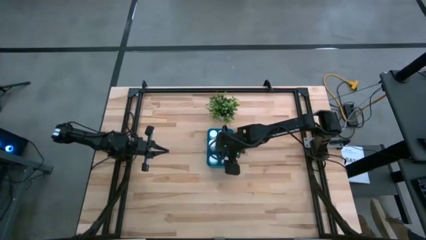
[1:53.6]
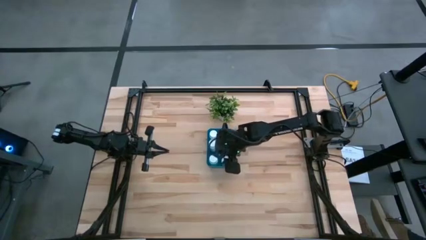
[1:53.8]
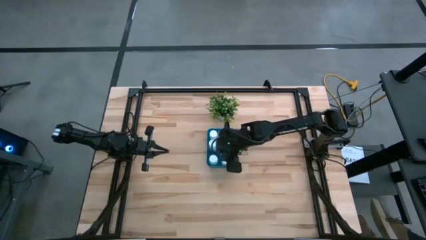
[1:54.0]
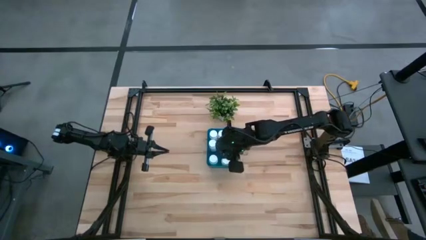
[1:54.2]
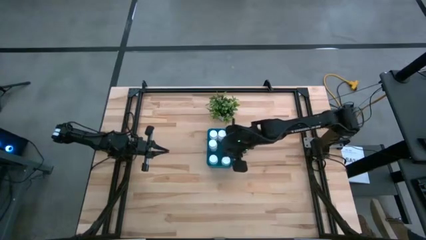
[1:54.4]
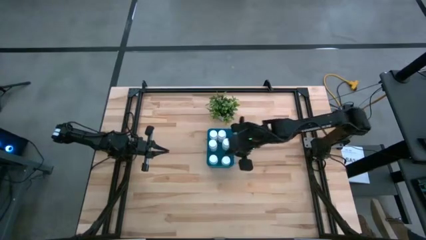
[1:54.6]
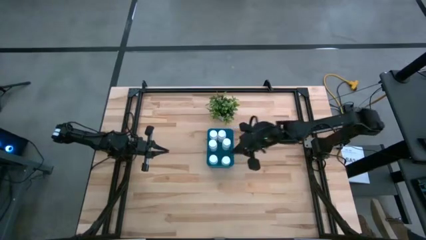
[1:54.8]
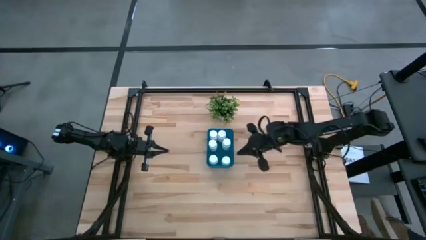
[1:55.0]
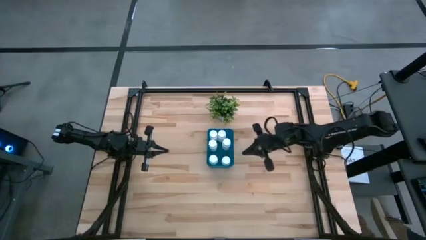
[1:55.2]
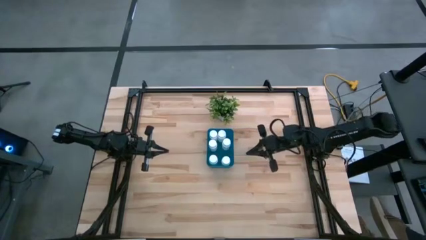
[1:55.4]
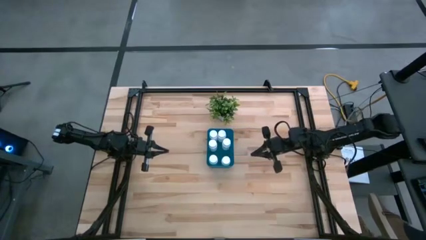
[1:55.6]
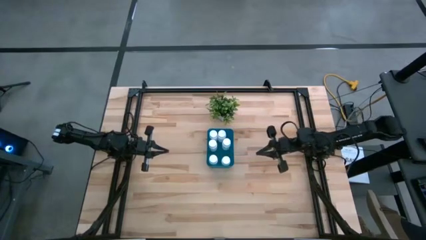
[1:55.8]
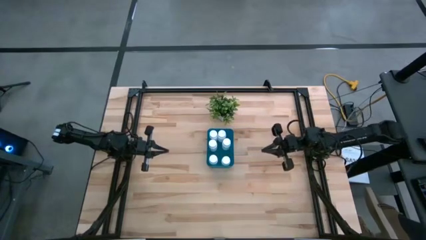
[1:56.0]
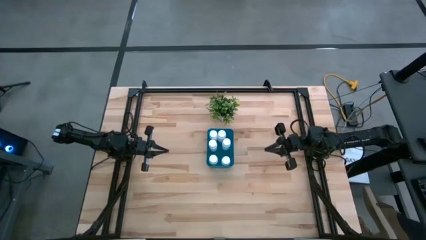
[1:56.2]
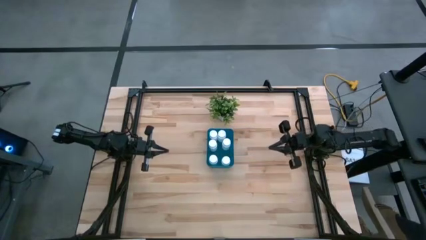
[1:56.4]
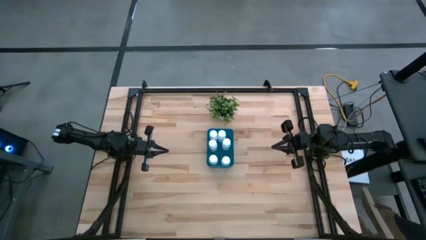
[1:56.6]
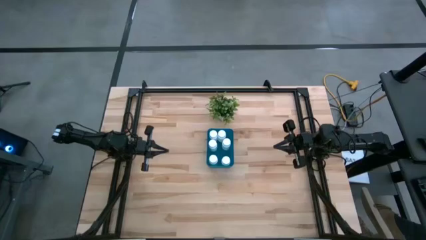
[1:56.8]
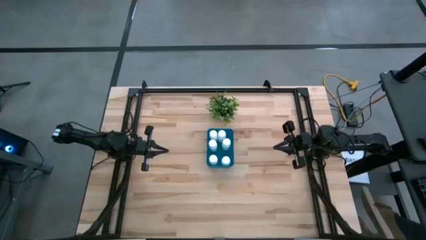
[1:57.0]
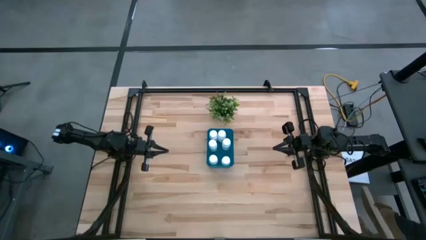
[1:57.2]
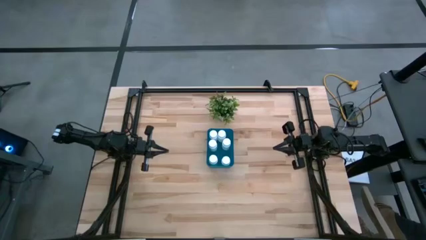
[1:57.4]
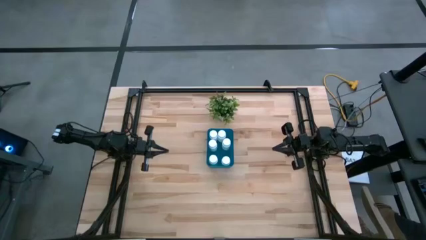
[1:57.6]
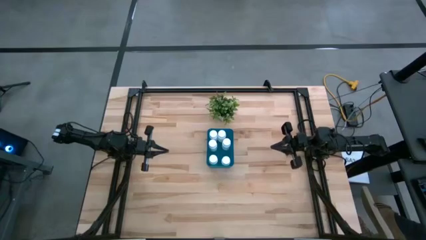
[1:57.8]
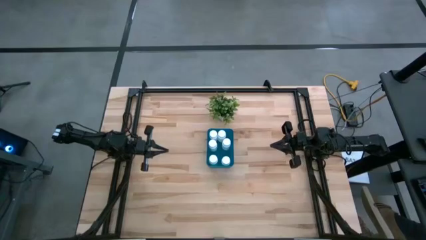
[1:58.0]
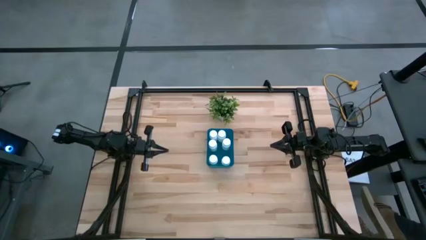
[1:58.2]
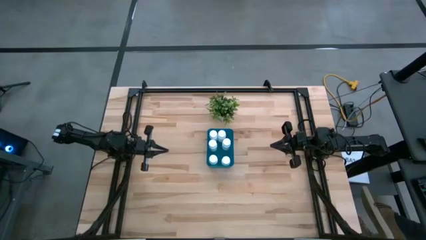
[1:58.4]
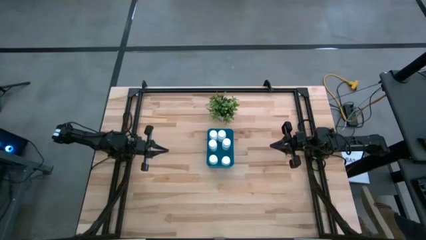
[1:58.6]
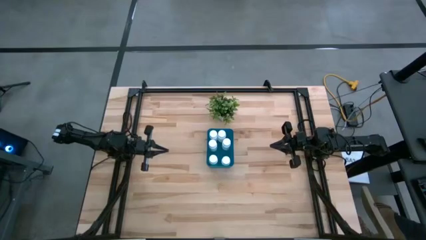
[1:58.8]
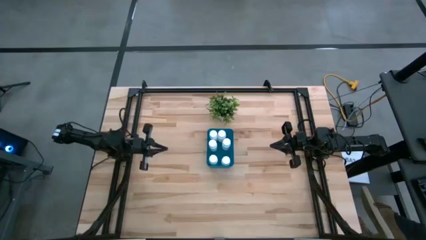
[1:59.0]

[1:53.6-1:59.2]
Task: Pick and place pill bottles into a basket
Return to Home Position

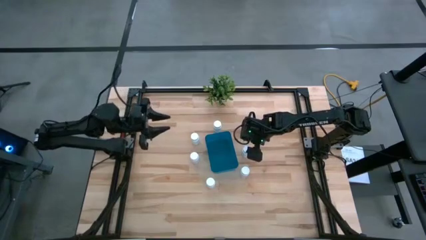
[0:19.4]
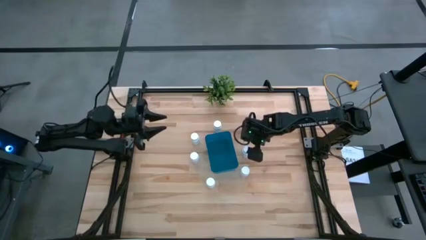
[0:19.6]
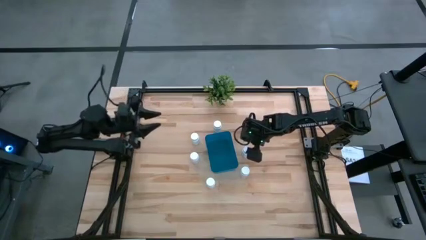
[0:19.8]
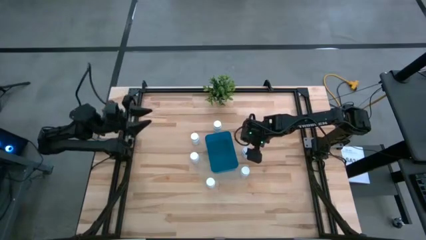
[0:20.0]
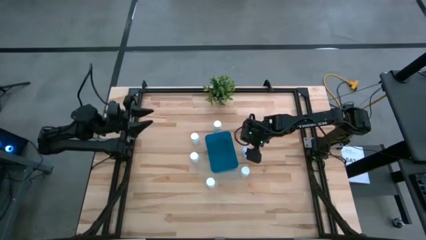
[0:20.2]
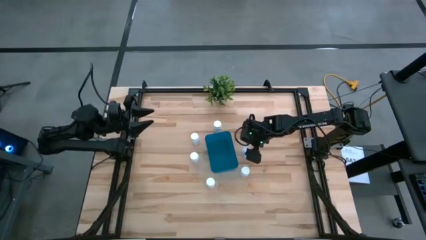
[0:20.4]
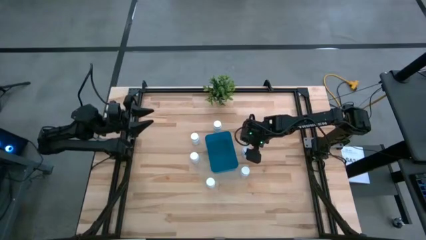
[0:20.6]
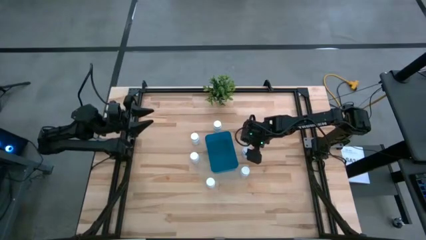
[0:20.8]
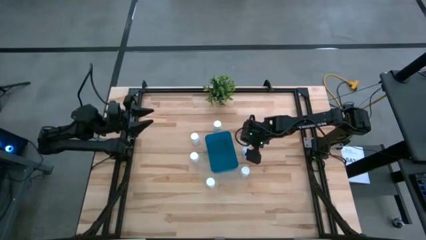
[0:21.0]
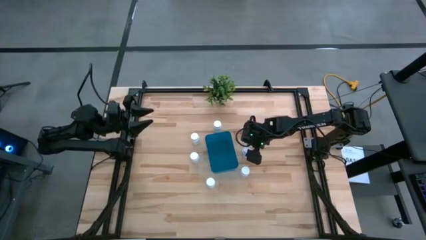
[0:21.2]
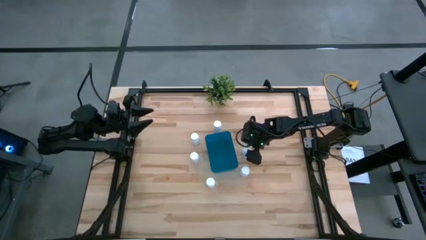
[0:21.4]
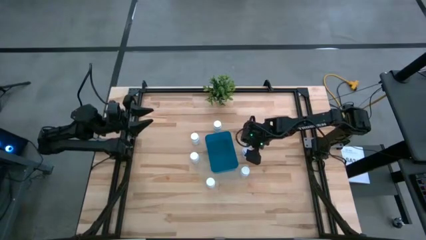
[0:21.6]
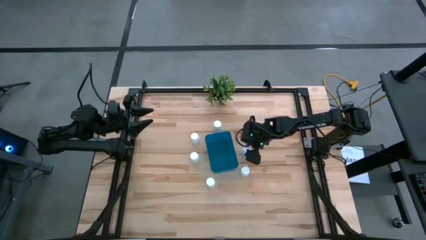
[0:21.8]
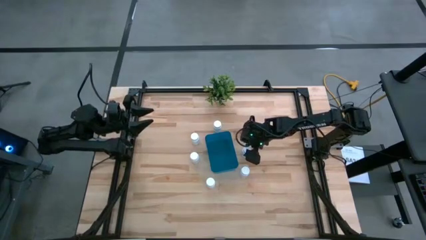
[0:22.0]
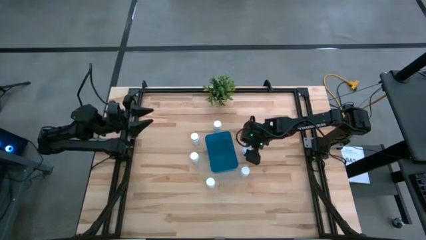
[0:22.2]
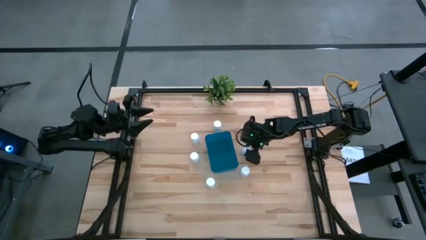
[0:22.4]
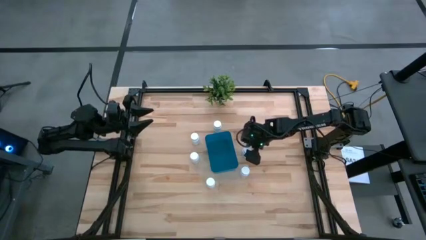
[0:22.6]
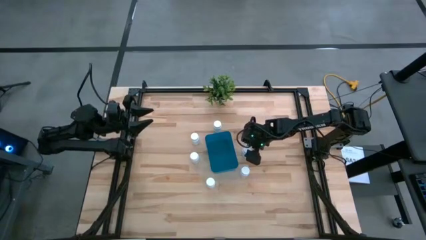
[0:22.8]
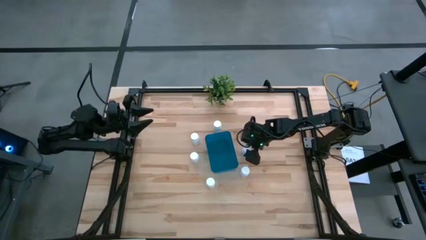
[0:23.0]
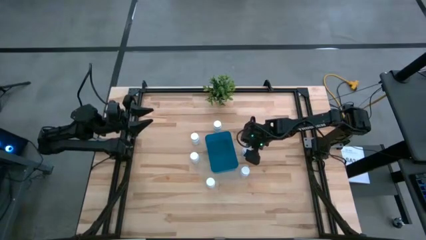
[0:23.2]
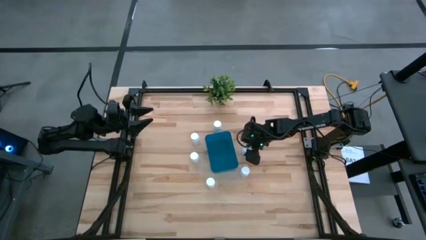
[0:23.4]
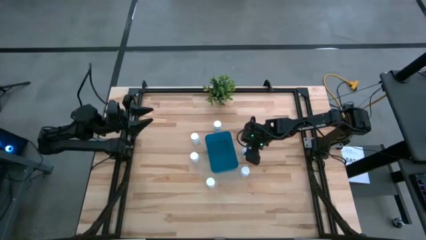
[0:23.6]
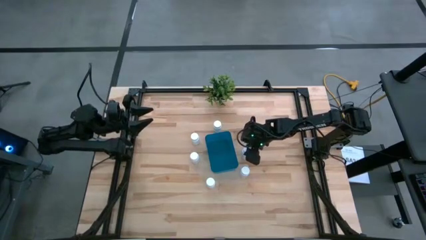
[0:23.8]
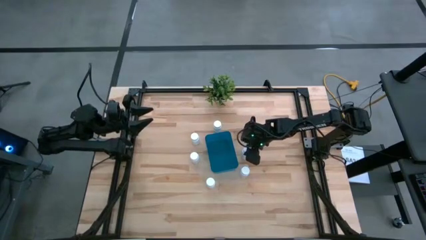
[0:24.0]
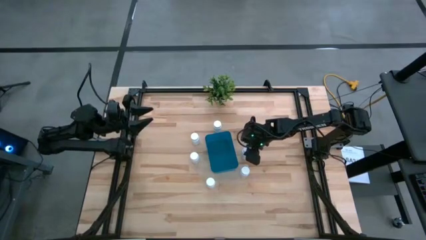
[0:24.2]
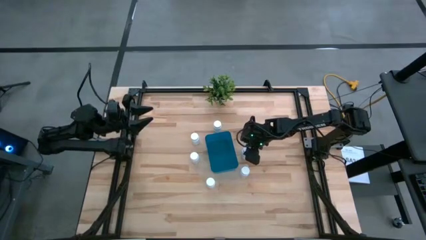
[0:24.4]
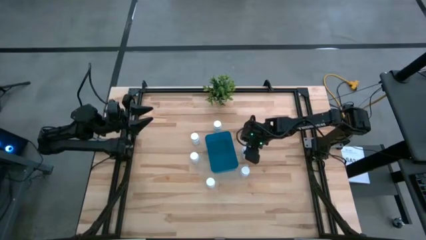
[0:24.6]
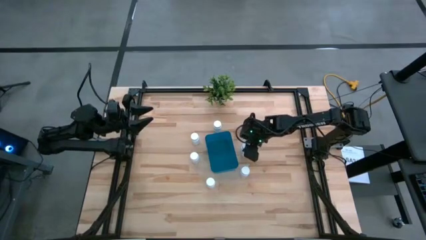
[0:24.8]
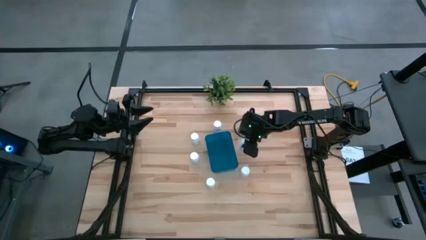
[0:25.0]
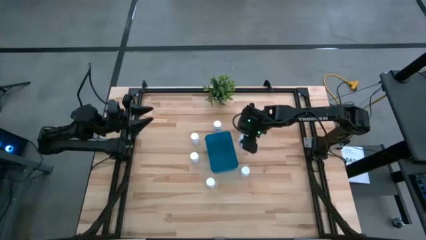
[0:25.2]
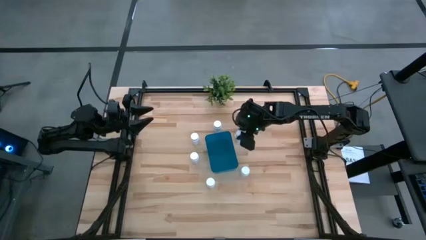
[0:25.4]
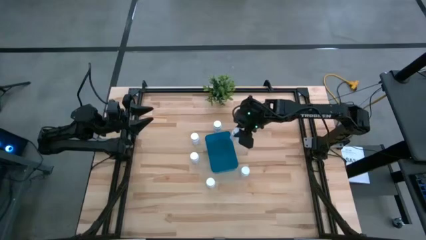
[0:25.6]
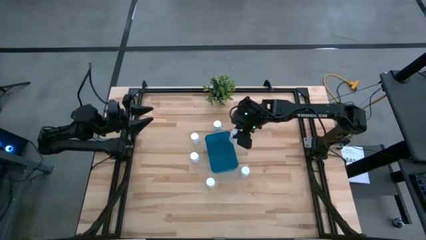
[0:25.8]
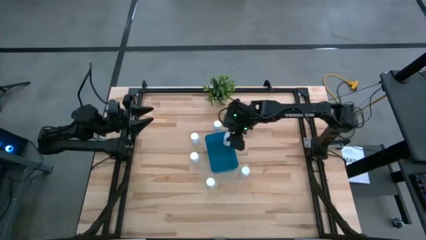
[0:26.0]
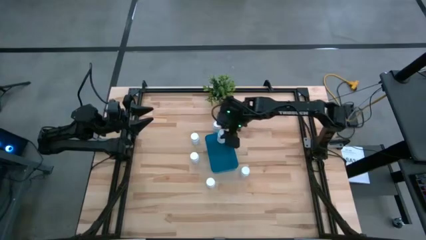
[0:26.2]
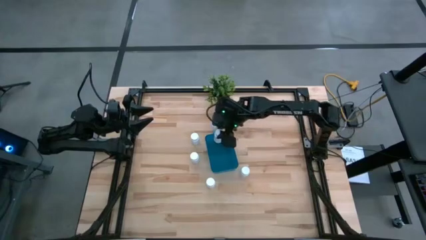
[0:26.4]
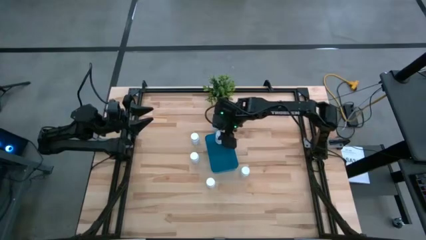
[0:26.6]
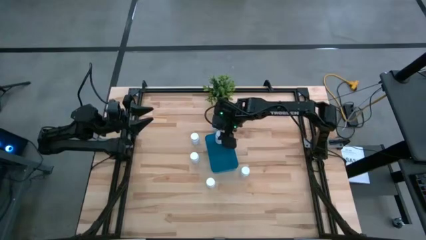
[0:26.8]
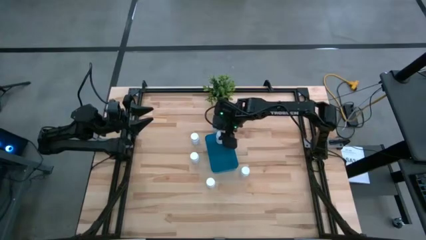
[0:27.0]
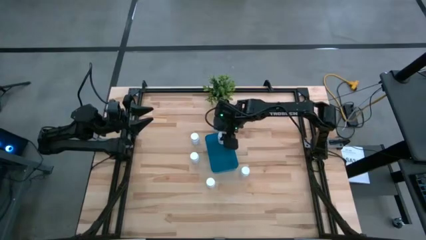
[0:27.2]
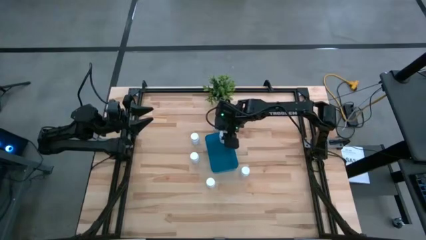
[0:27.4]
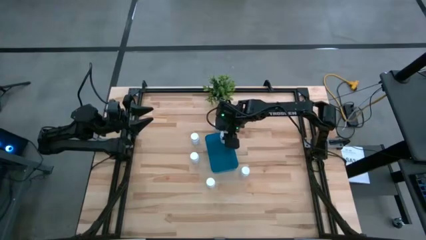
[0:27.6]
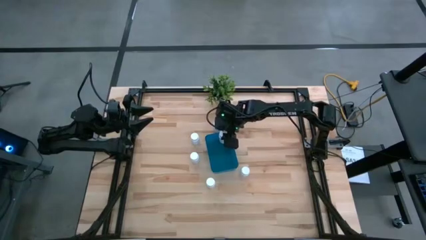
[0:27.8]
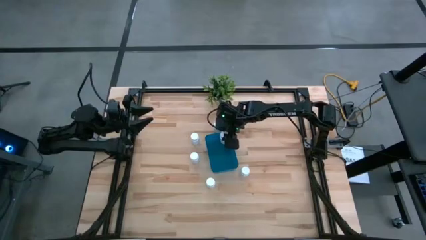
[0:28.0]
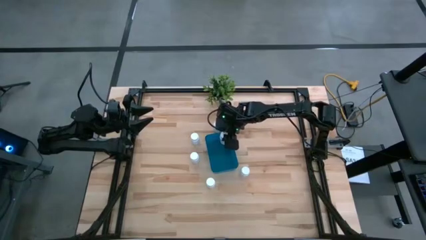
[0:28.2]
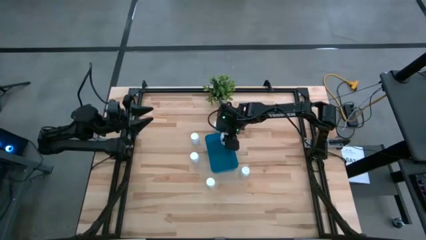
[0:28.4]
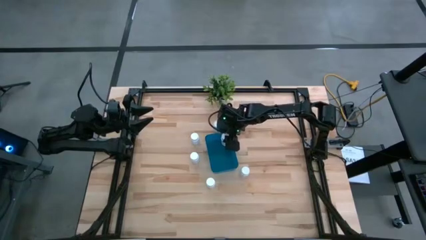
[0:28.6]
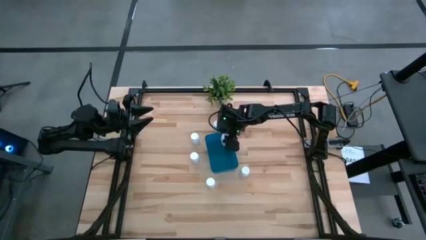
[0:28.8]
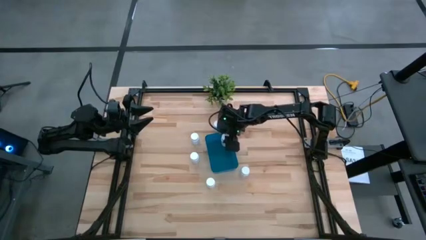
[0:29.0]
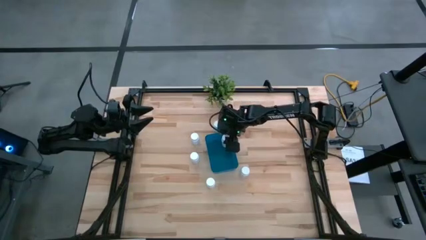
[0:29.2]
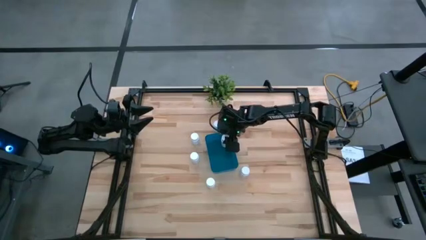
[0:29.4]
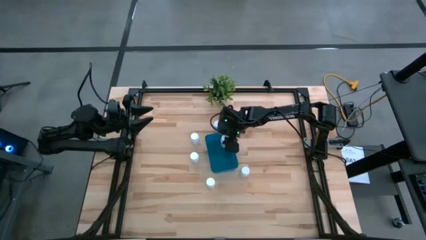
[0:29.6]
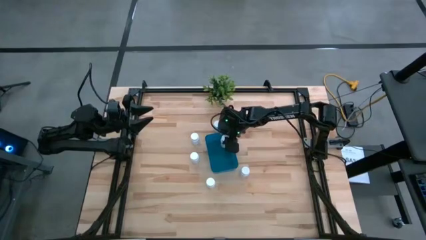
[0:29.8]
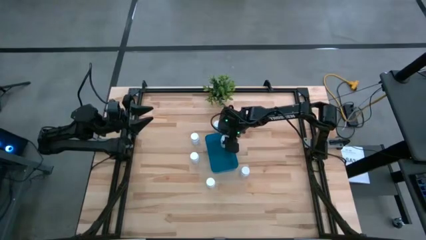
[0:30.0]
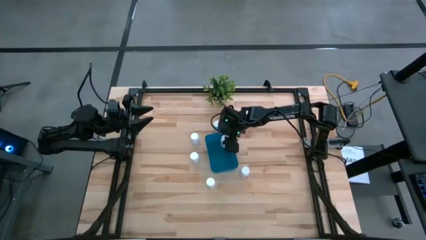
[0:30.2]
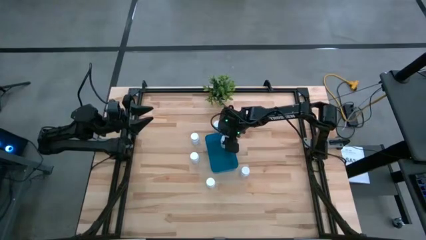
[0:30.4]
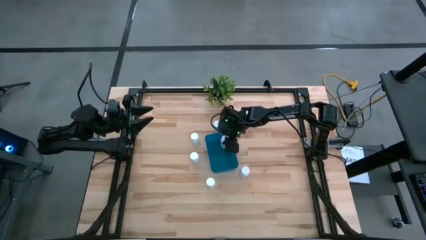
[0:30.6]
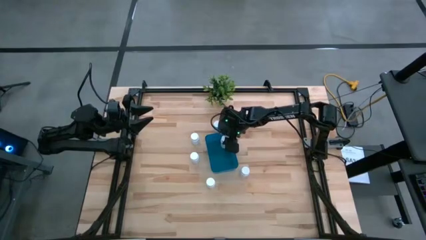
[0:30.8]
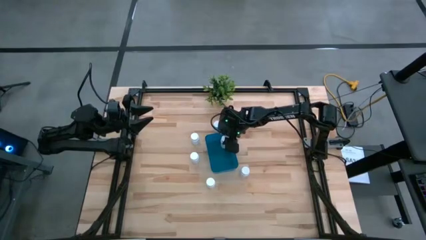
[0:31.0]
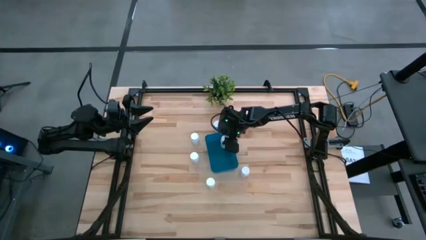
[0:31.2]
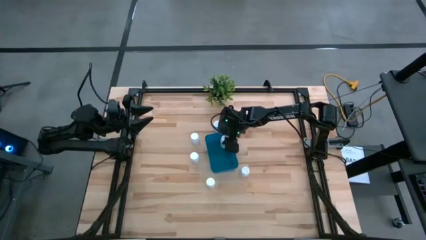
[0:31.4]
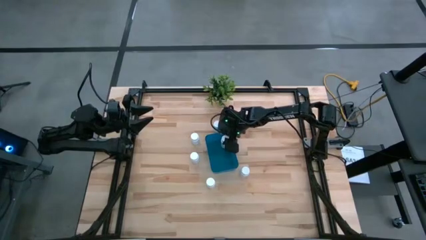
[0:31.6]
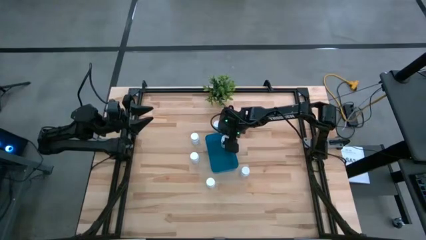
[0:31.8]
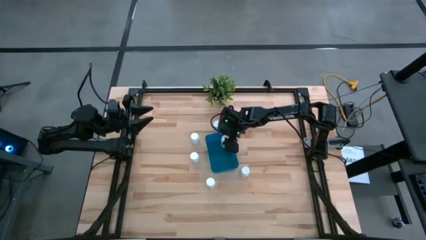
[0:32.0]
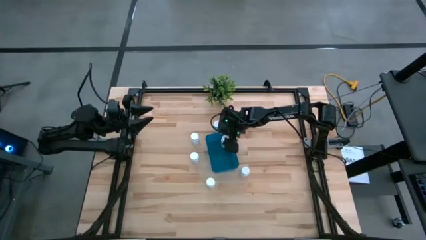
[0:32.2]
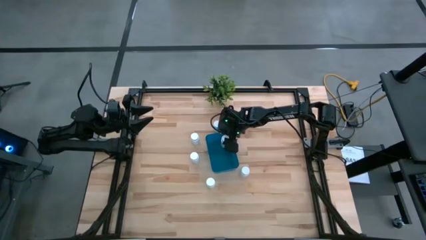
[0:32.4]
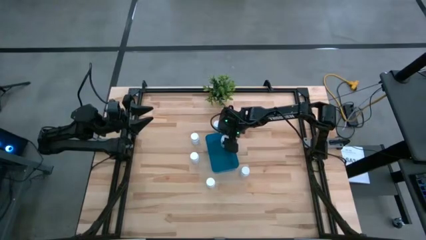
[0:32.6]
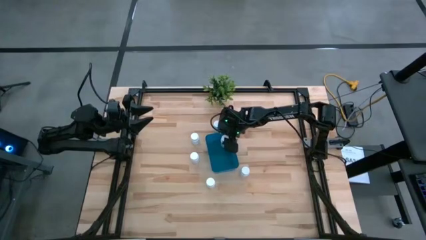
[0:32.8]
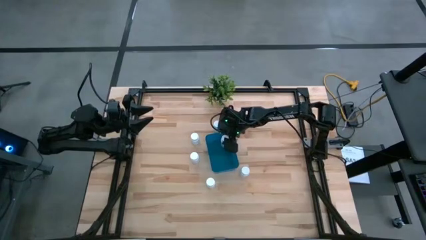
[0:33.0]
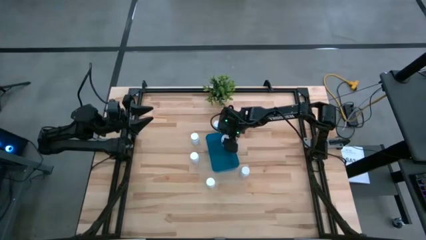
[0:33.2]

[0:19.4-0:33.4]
Task: Pick and place pill bottles into a basket
Put the white medicine bottle into the blue bin
